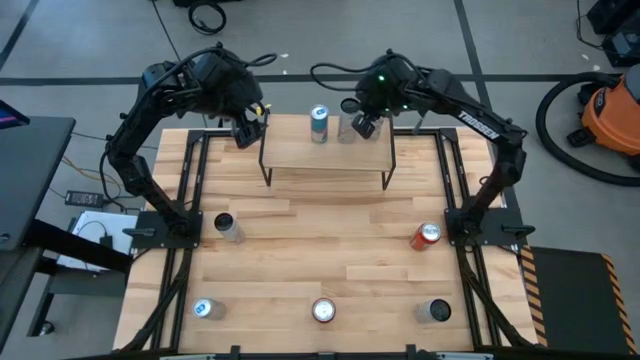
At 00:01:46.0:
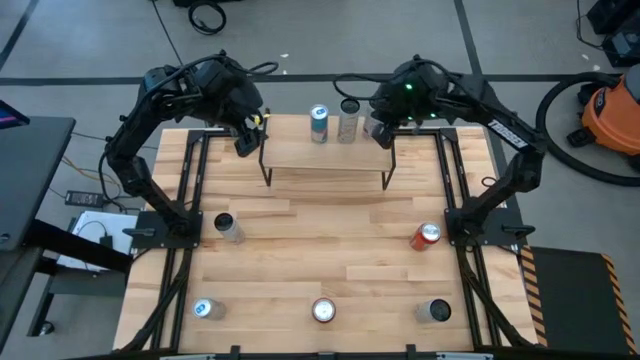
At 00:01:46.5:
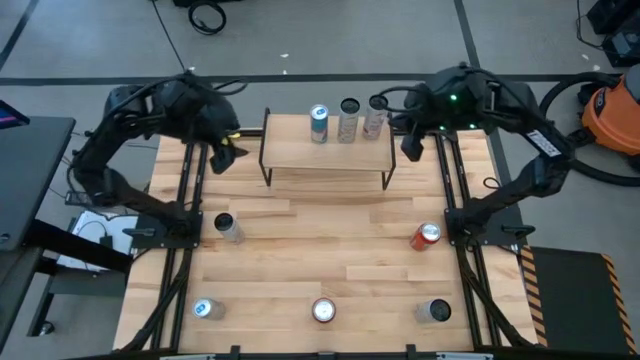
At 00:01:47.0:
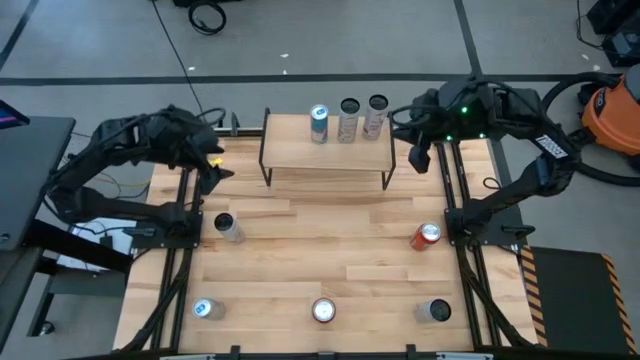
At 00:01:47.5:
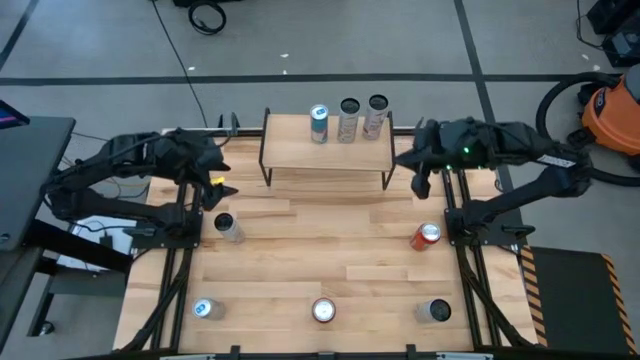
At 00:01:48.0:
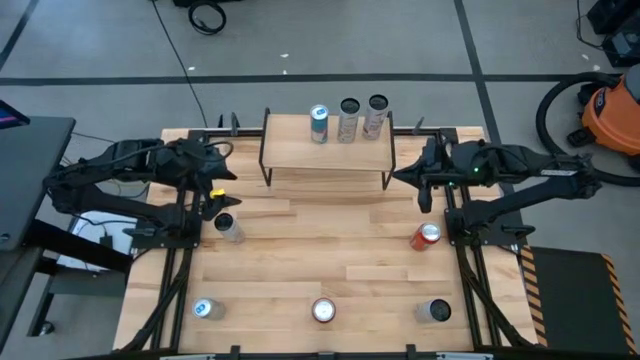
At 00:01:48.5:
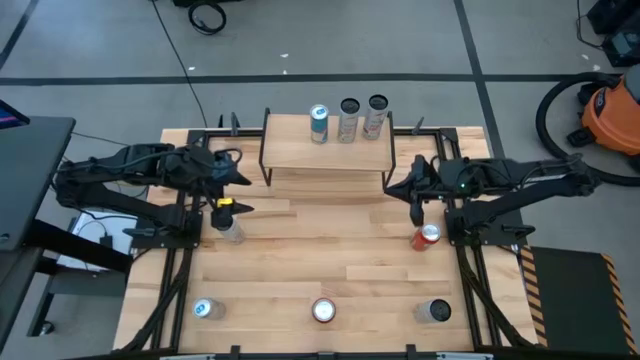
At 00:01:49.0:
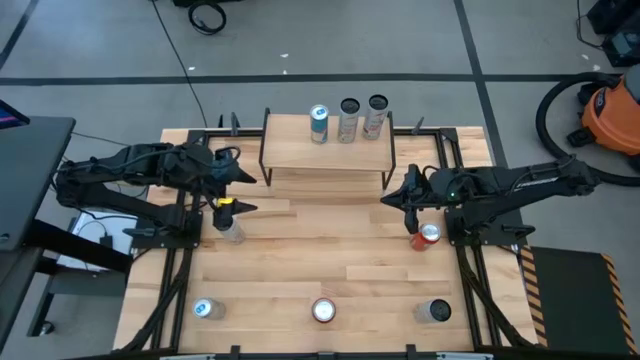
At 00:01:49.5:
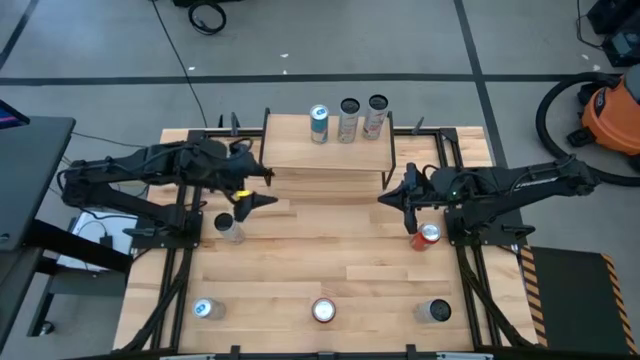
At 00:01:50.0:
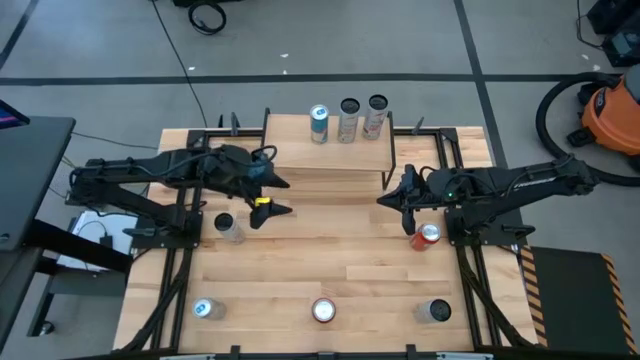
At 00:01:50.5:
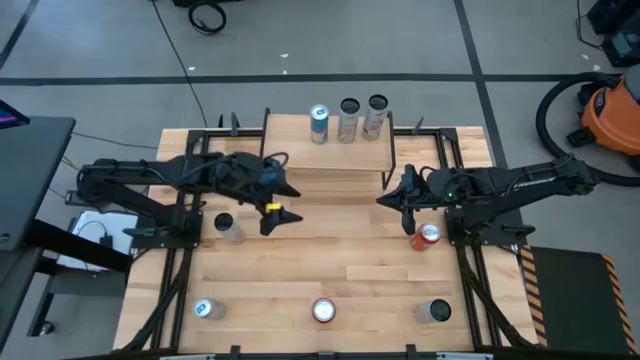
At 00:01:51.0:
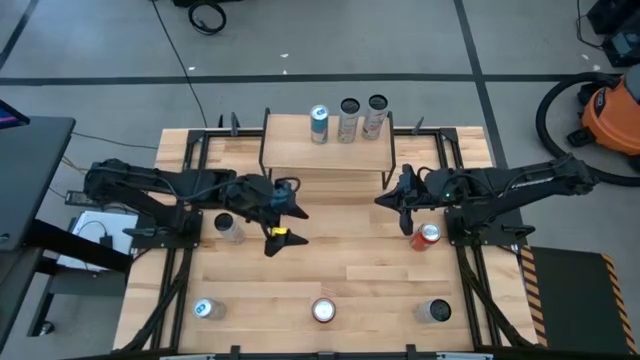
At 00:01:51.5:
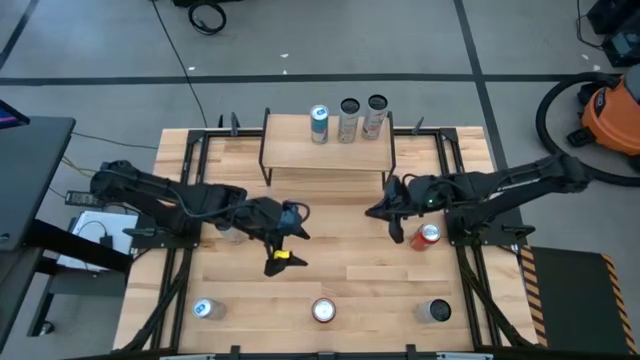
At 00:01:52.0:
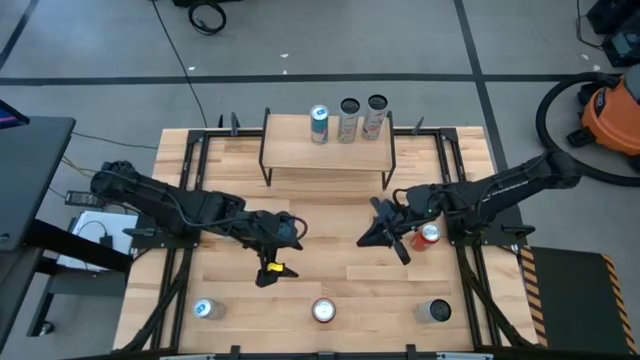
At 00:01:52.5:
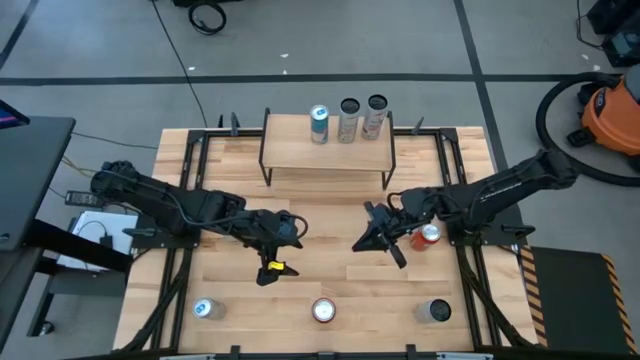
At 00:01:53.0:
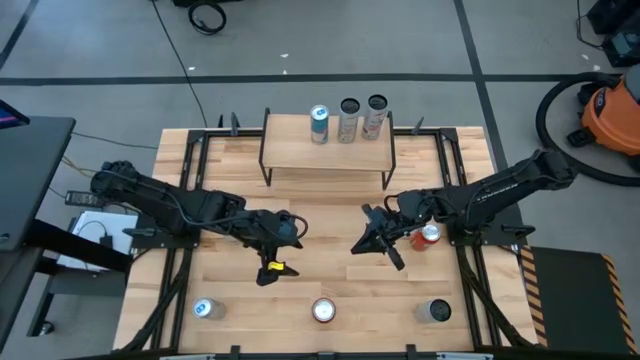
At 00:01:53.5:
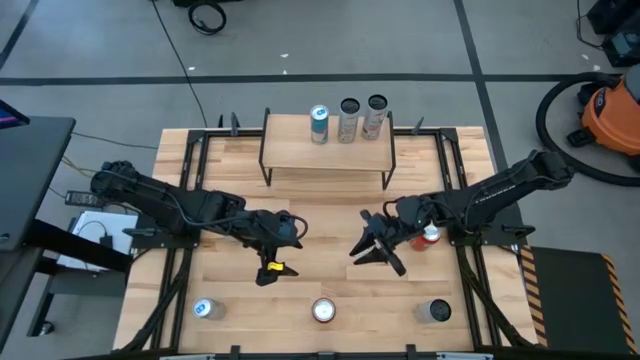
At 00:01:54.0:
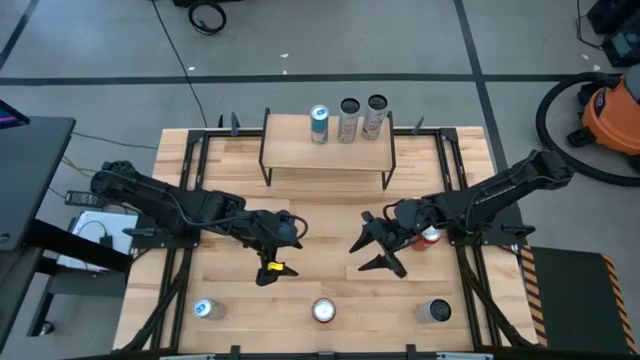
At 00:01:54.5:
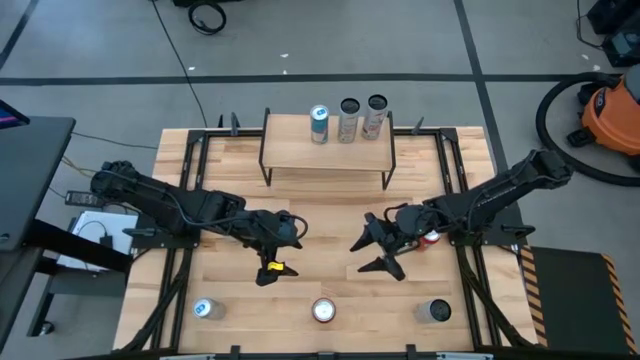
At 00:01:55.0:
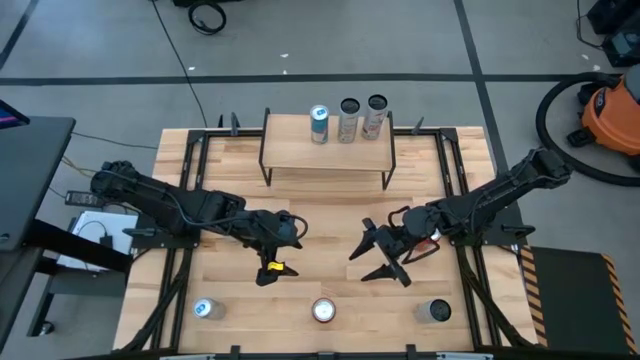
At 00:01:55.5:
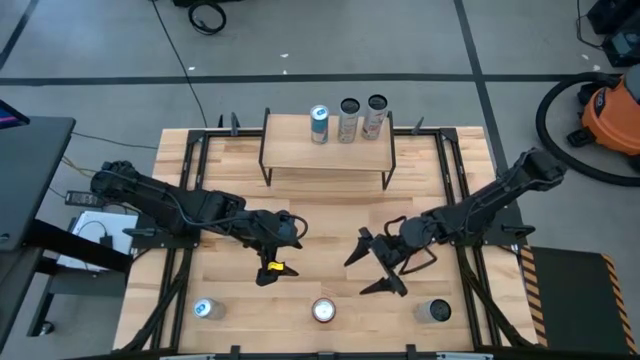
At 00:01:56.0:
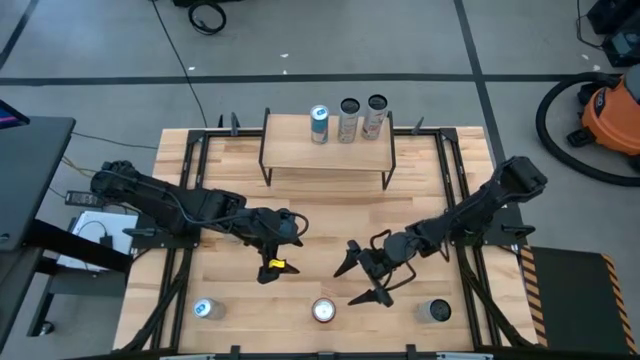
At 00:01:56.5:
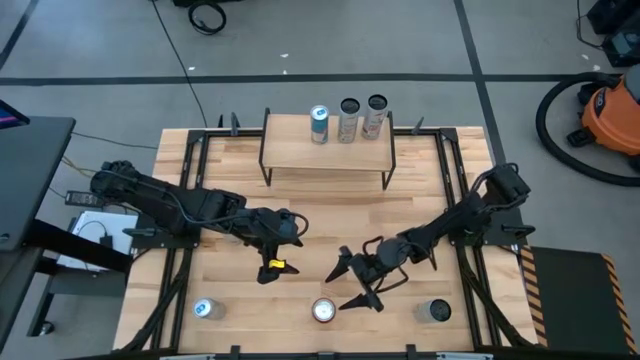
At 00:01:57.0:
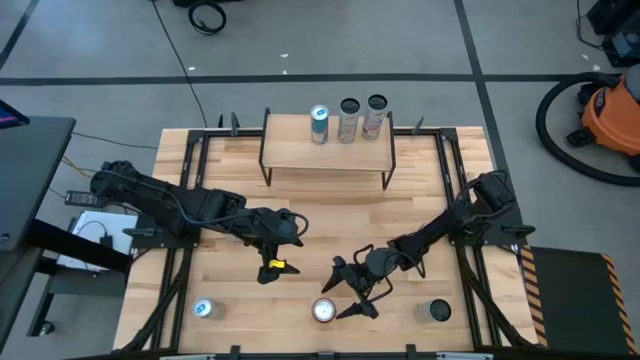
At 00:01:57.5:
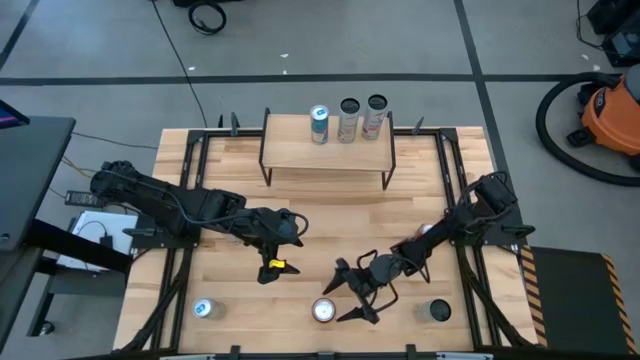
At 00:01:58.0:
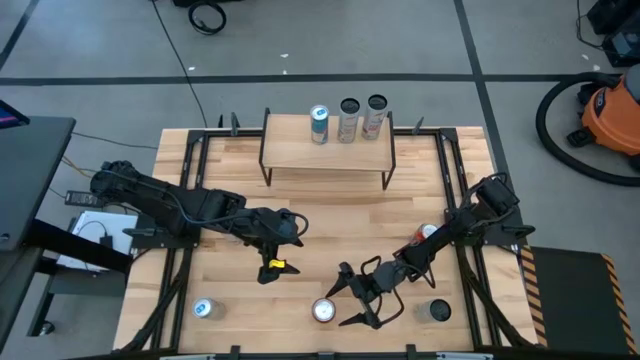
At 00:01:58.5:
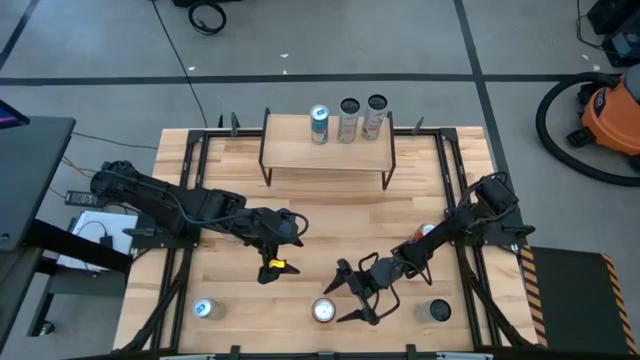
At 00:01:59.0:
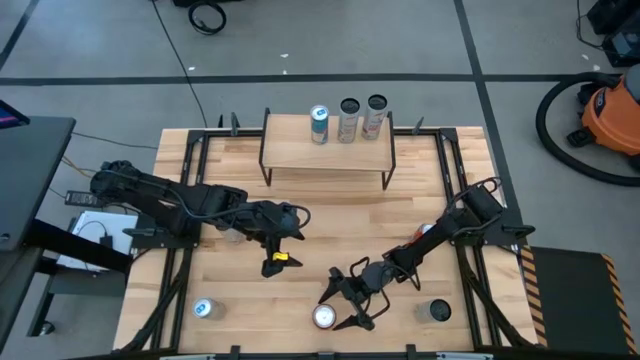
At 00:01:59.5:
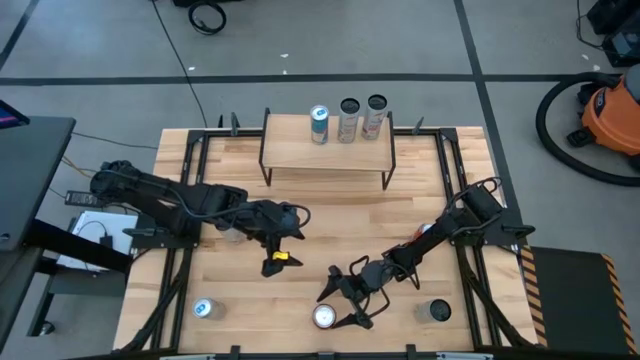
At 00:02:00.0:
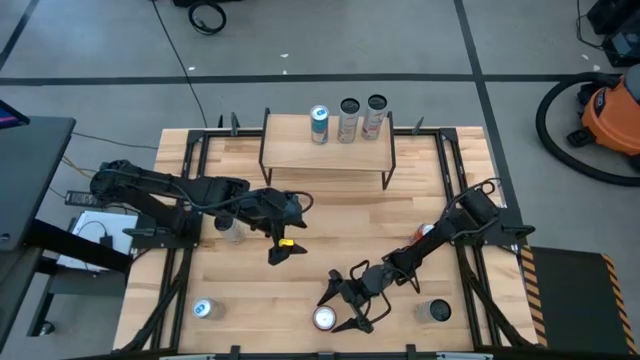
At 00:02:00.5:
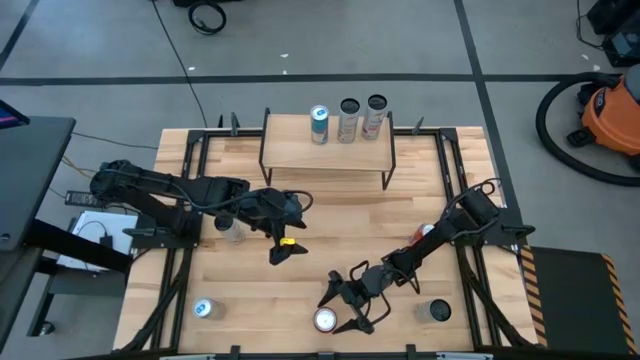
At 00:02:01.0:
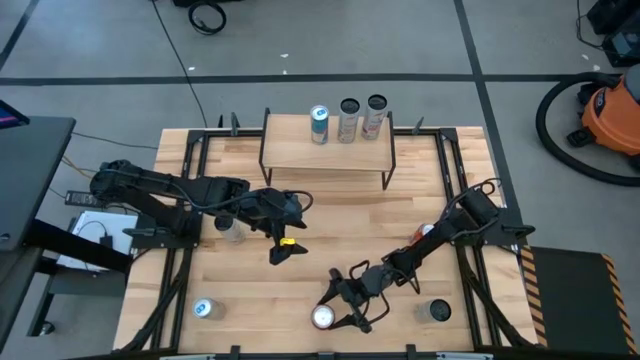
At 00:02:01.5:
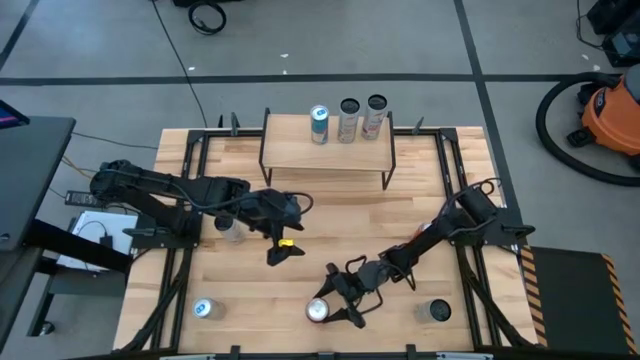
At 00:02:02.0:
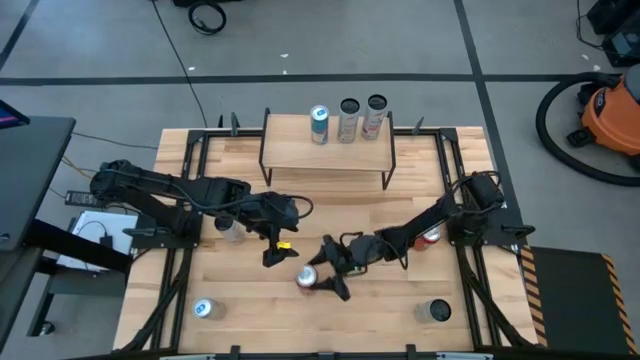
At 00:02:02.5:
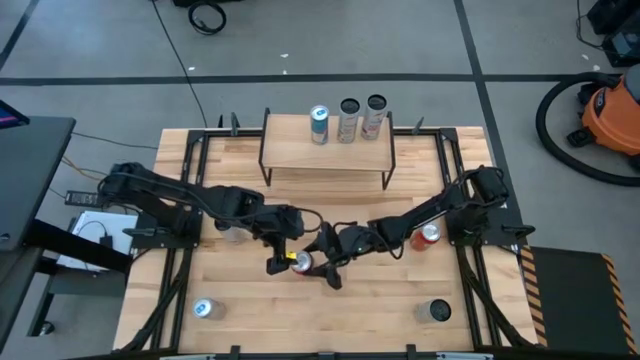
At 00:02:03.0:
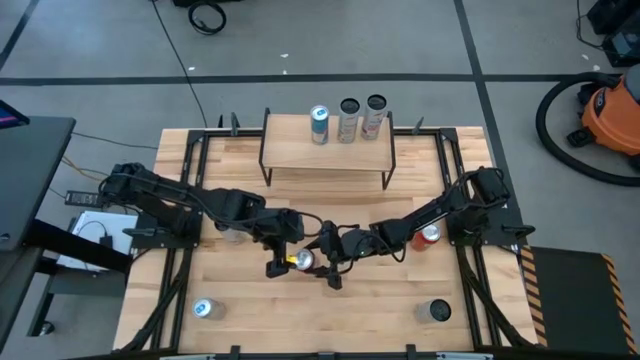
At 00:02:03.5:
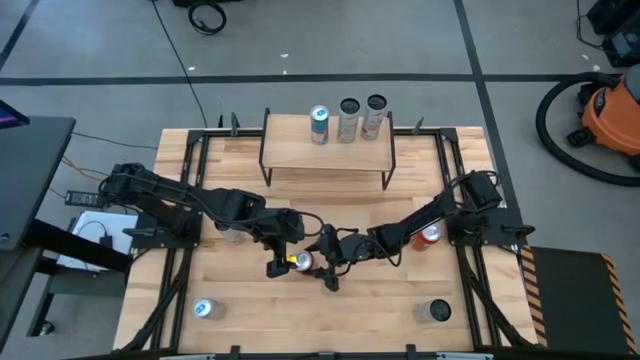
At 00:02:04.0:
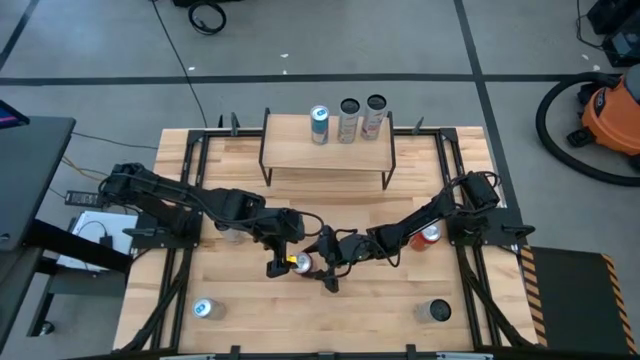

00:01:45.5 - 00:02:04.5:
Task: Place canned beverage on shelf
Put the left red soda can on the shelf
